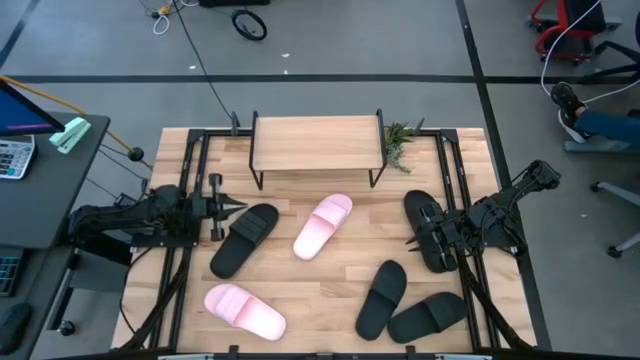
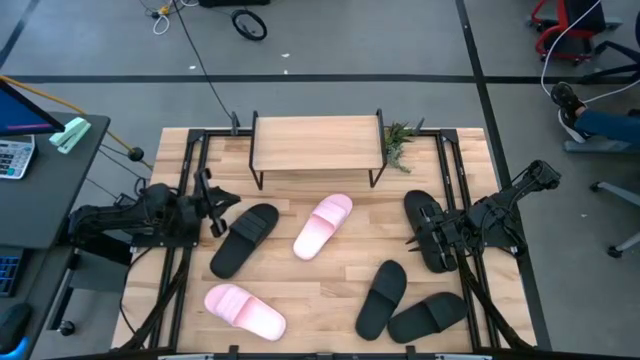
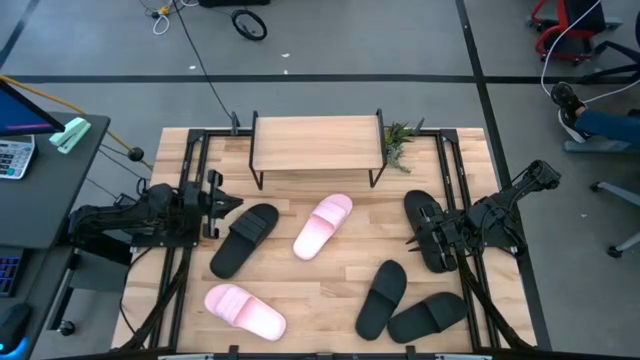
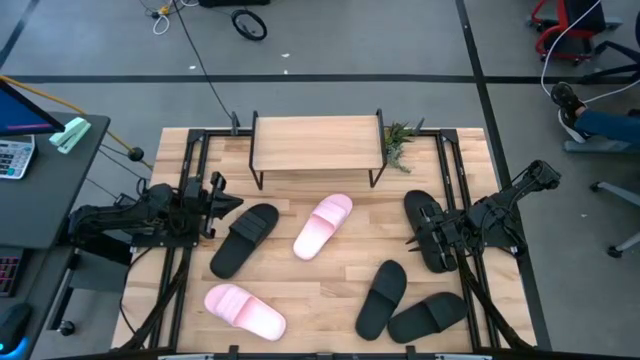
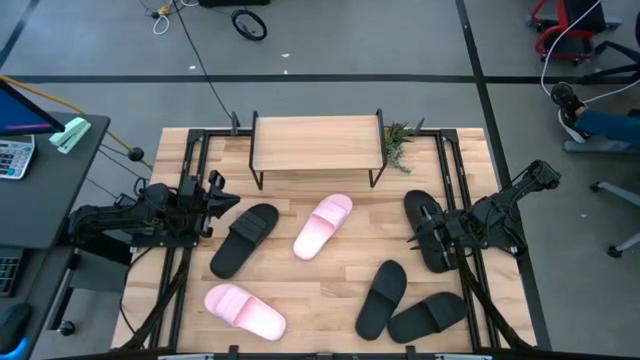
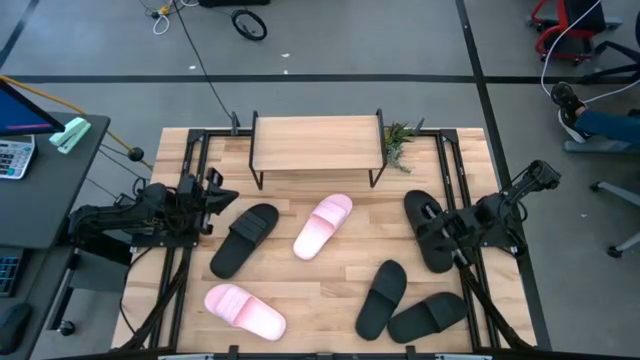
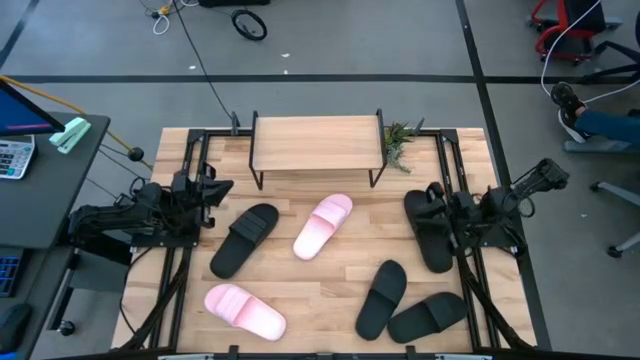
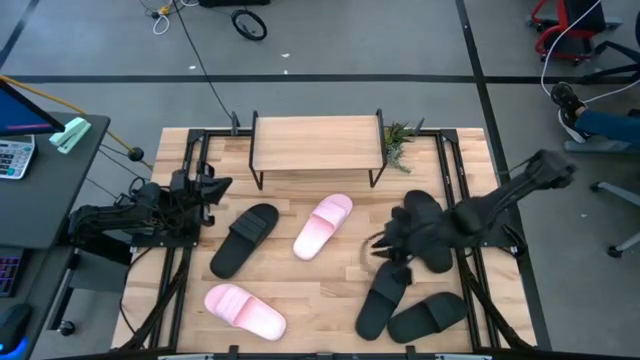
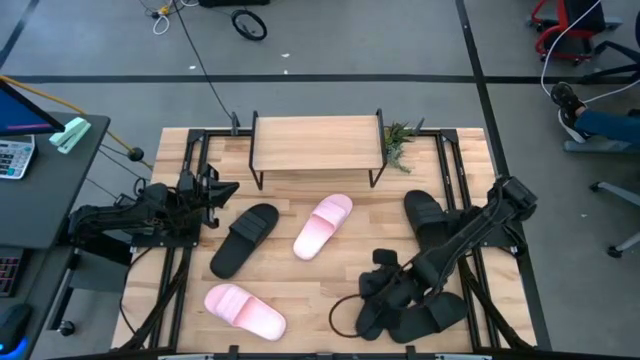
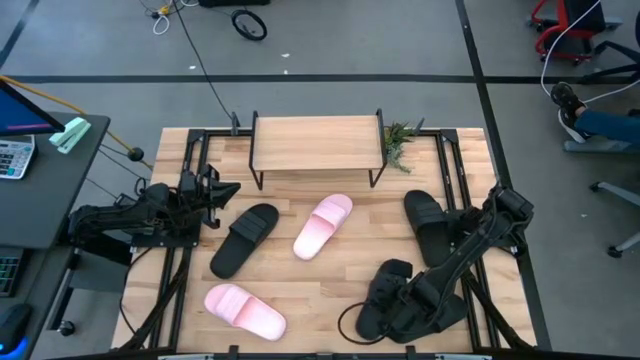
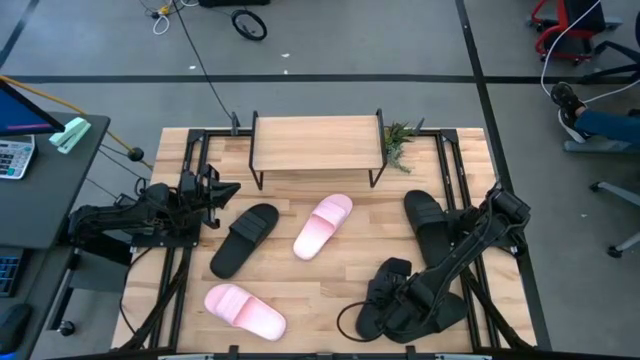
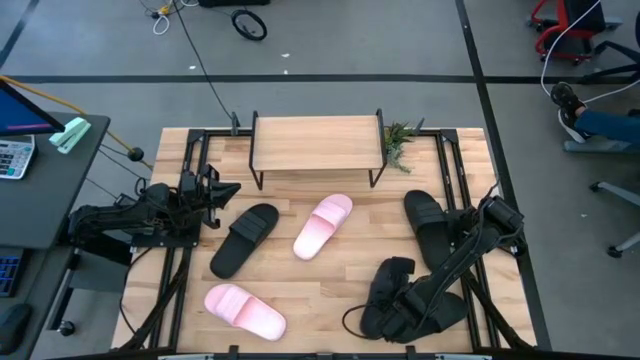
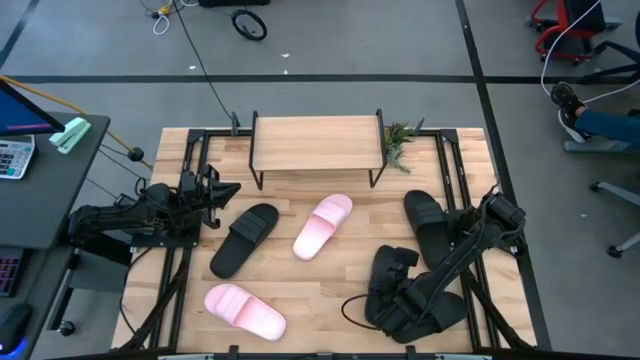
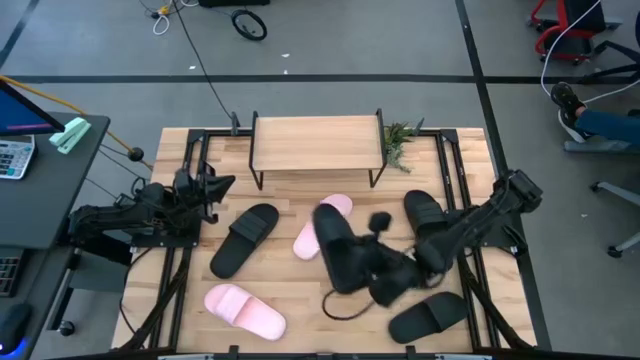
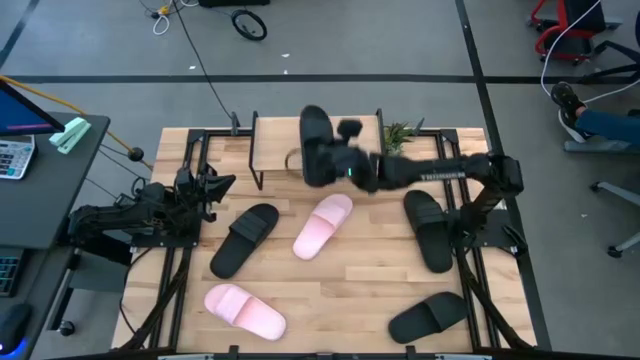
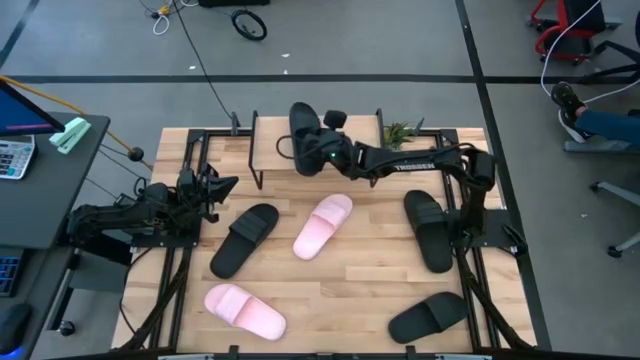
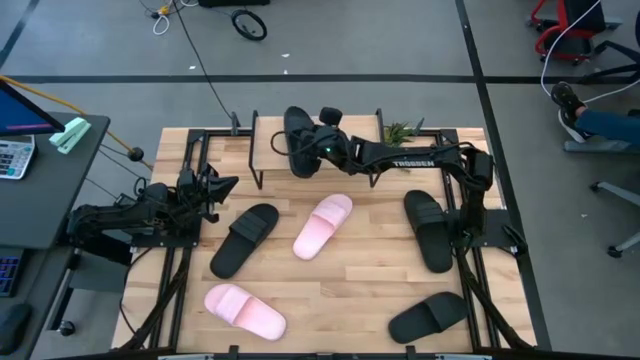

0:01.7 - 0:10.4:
Task: Pick and place slides into the shelf
Put the black slipper on the shelf

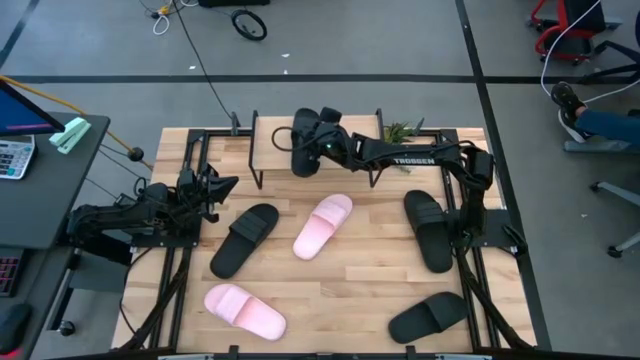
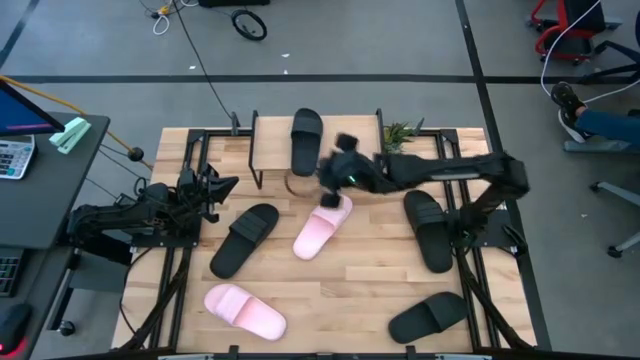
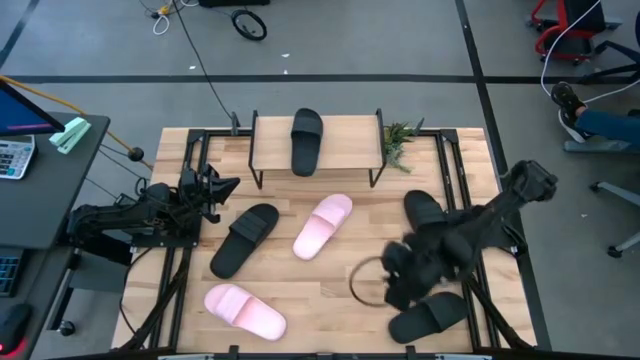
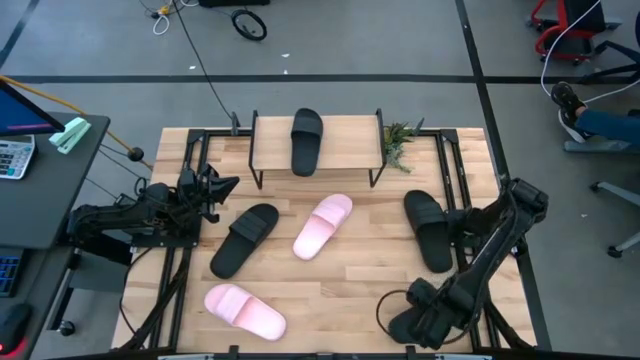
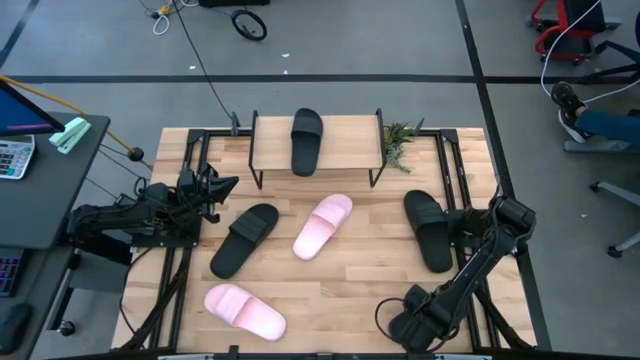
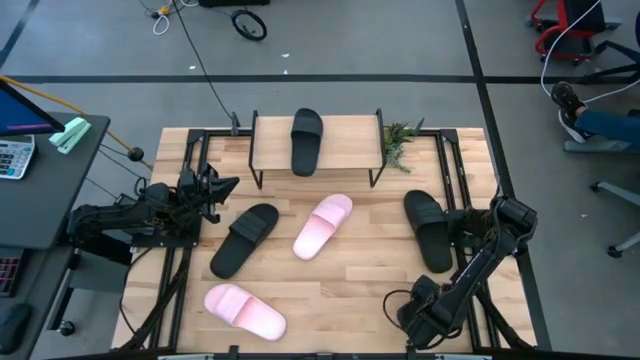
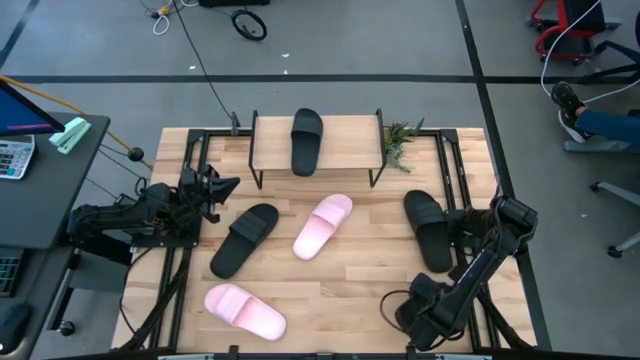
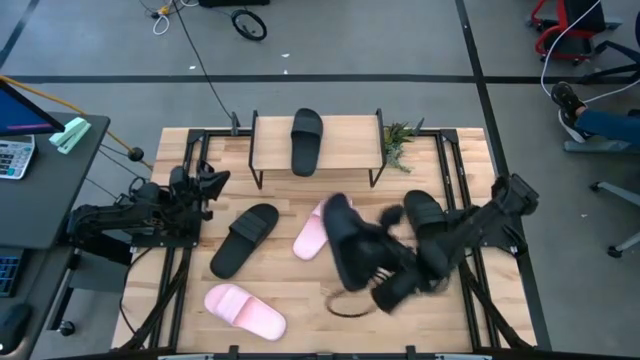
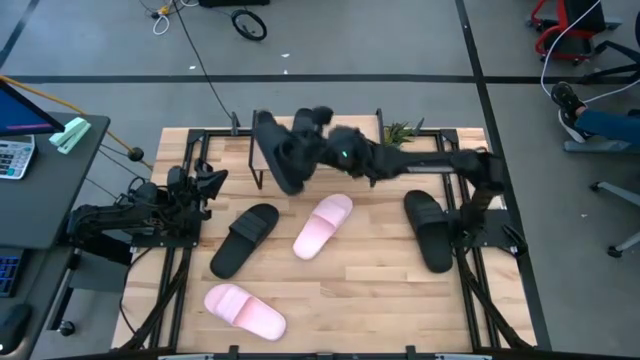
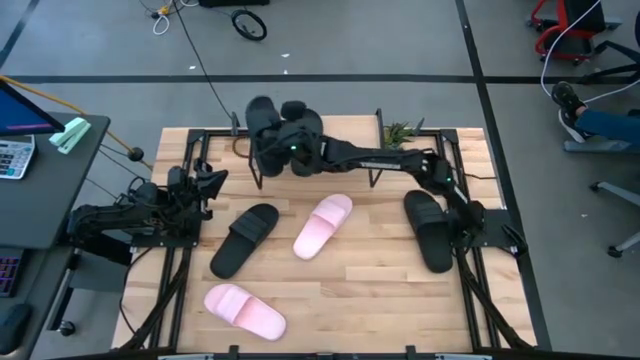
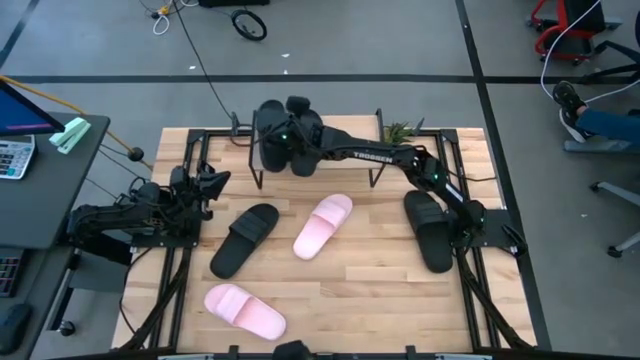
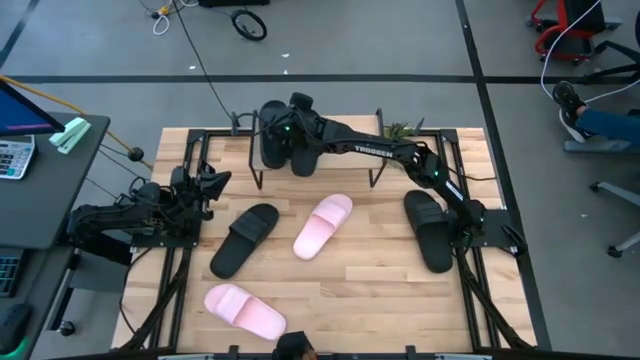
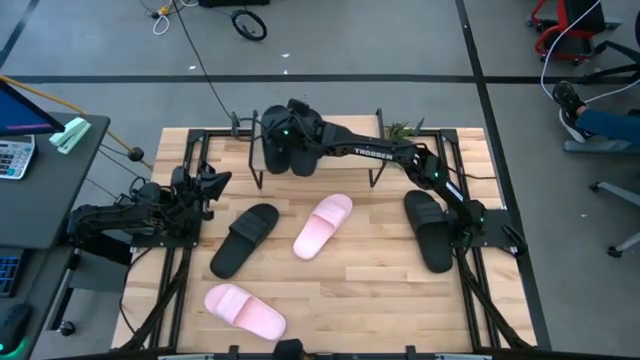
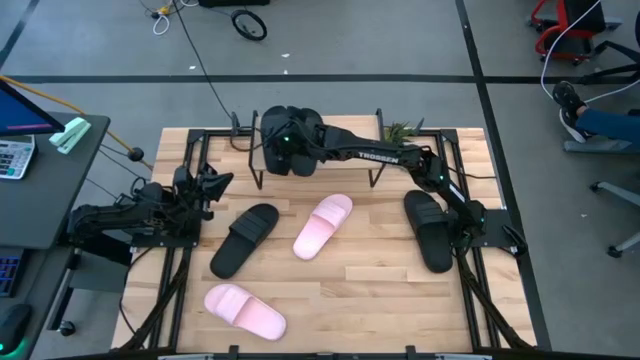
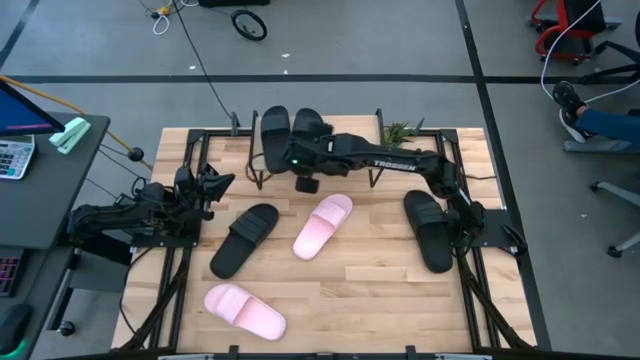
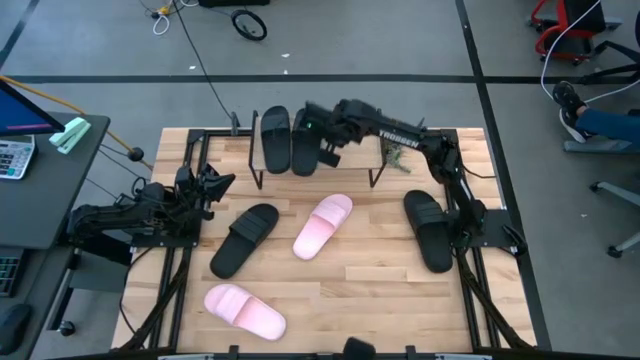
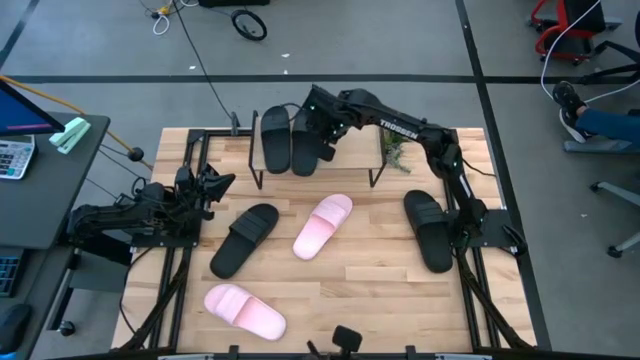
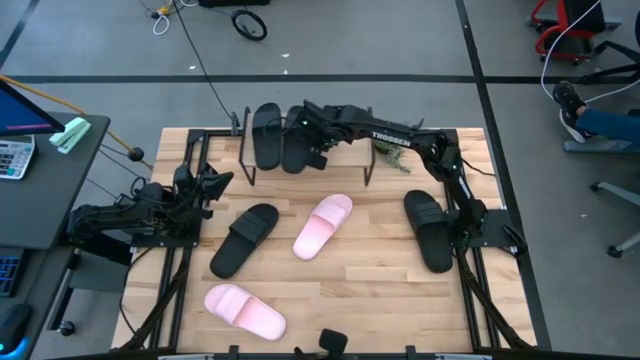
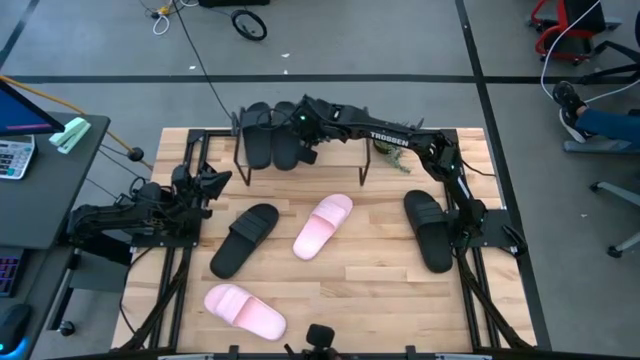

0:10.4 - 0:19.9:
Put the black slipper on the shelf

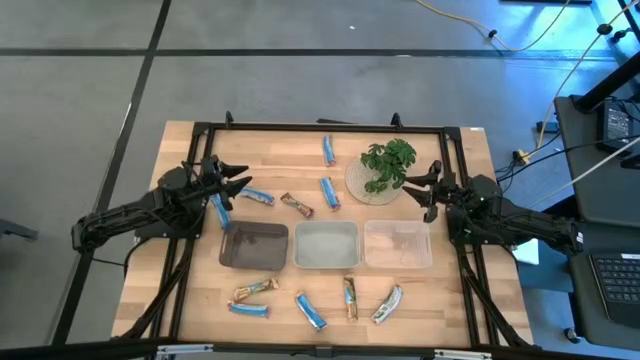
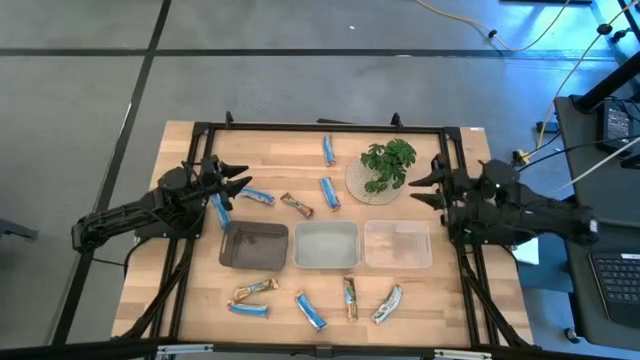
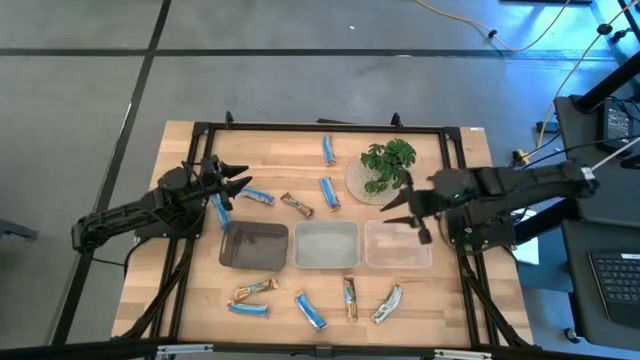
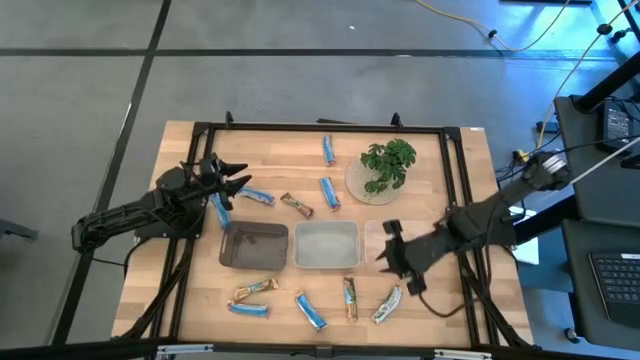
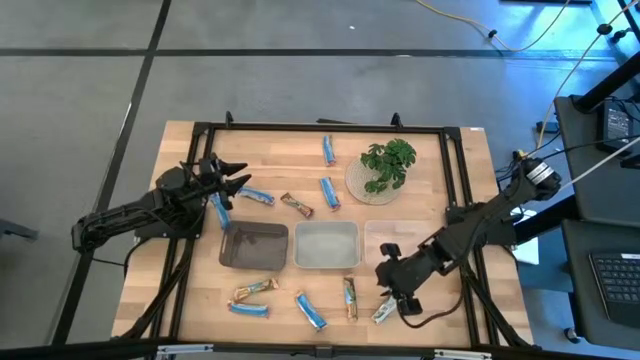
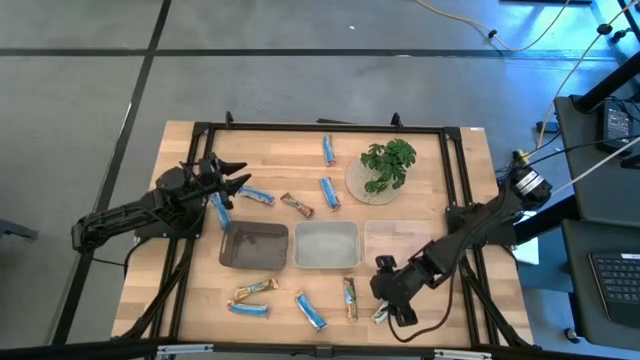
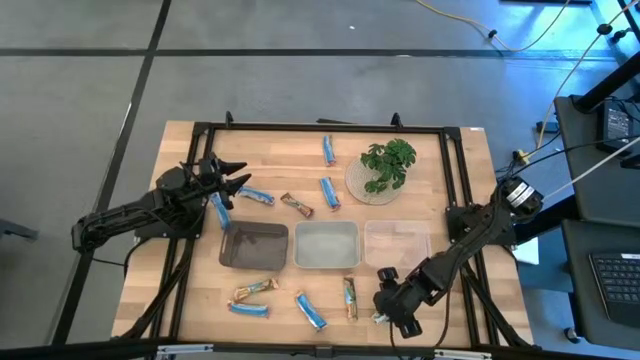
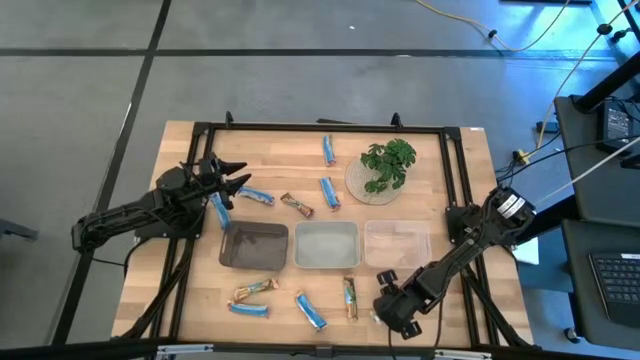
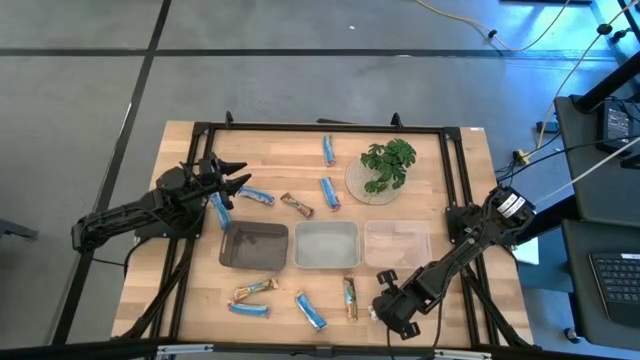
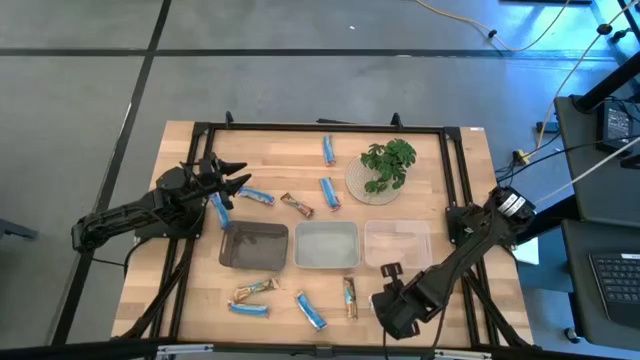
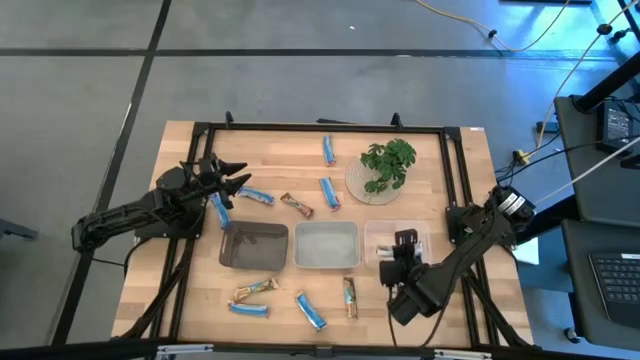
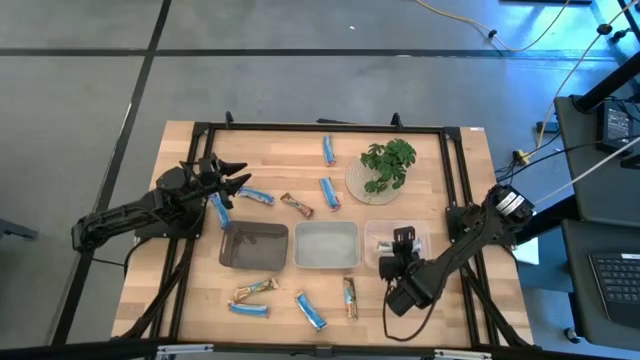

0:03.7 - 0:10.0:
Task: Pick and place Granola Bars by type
Put the orange granola bar into the transparent bin
